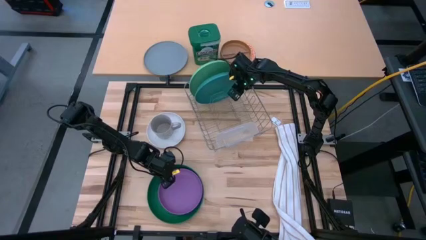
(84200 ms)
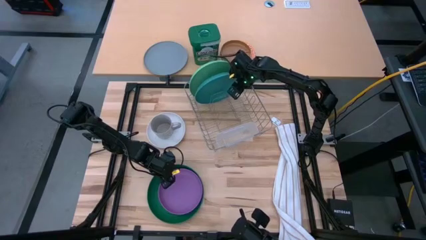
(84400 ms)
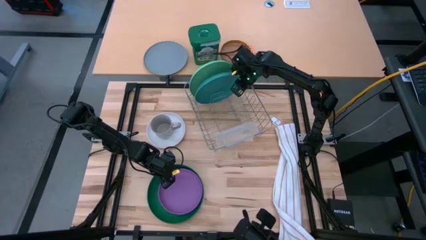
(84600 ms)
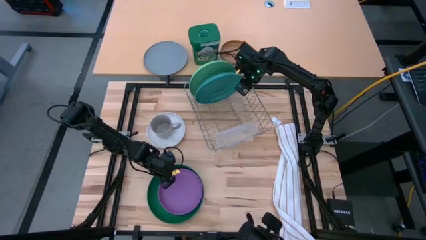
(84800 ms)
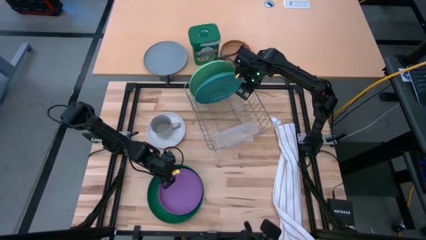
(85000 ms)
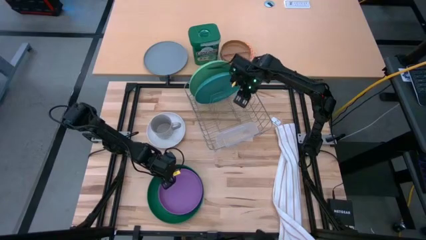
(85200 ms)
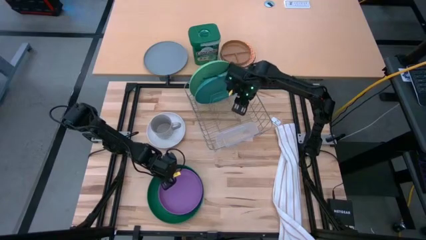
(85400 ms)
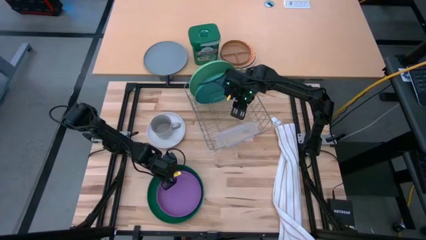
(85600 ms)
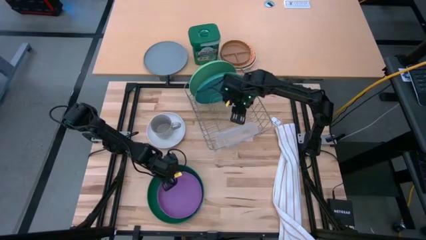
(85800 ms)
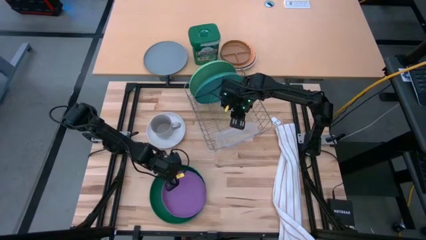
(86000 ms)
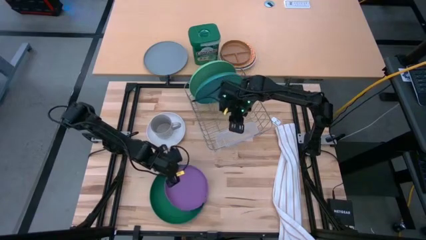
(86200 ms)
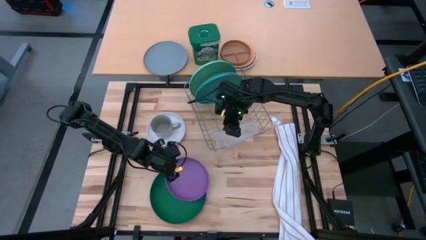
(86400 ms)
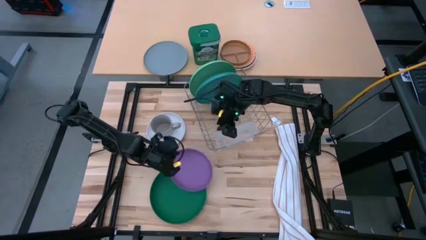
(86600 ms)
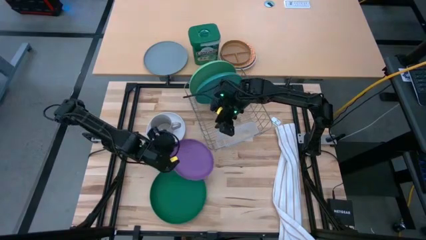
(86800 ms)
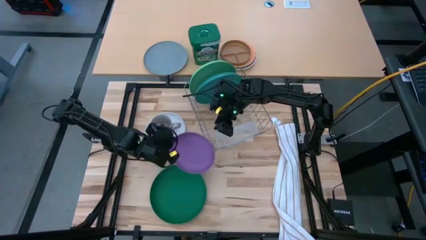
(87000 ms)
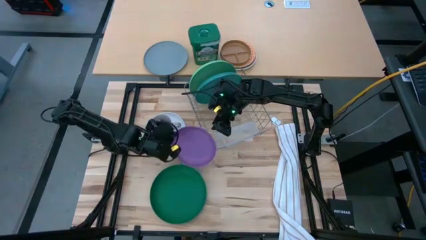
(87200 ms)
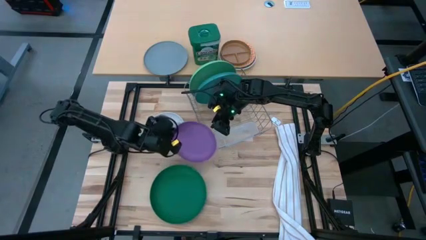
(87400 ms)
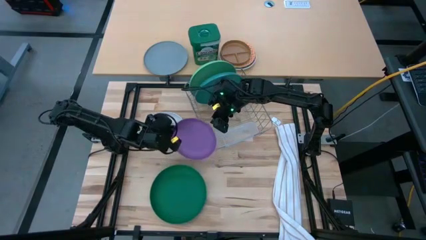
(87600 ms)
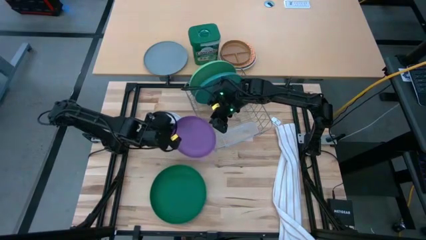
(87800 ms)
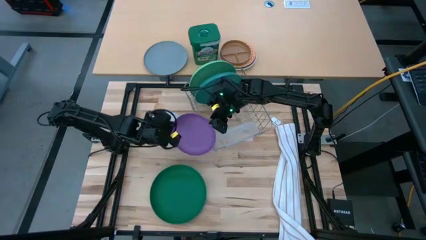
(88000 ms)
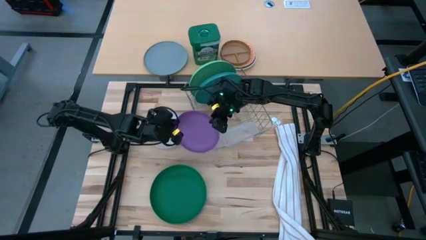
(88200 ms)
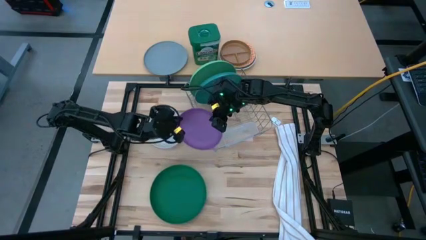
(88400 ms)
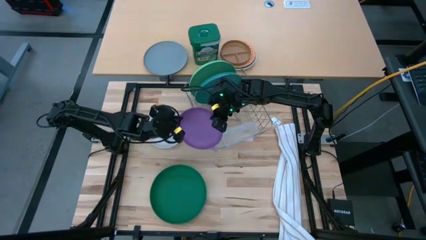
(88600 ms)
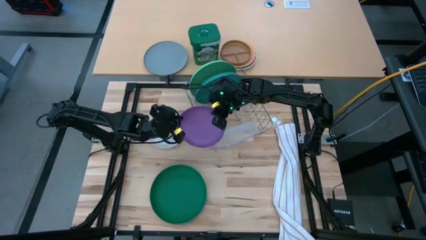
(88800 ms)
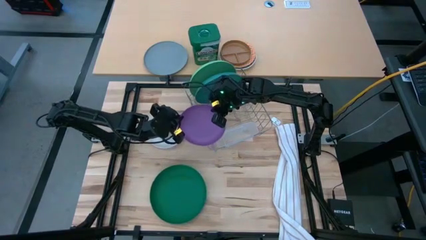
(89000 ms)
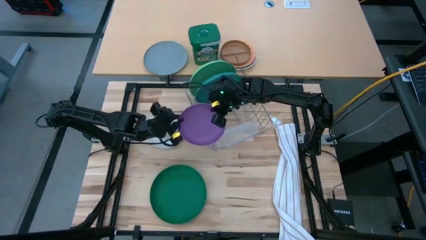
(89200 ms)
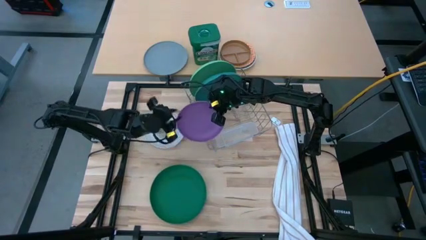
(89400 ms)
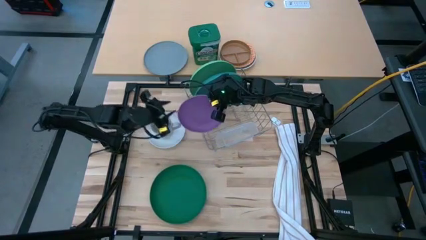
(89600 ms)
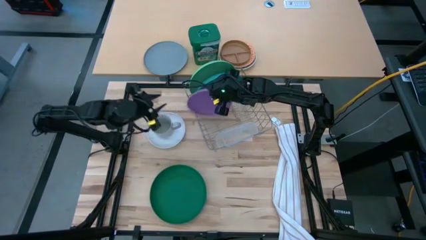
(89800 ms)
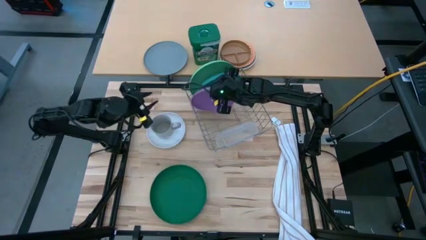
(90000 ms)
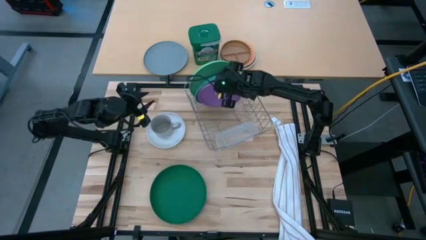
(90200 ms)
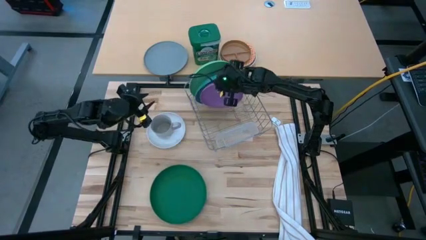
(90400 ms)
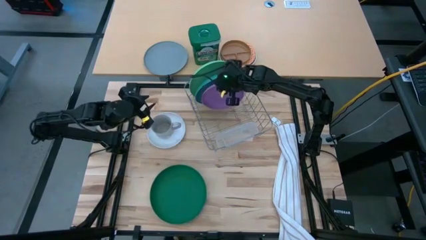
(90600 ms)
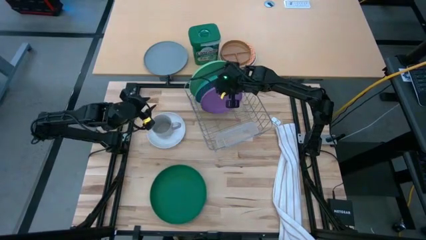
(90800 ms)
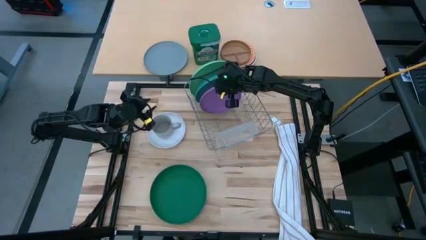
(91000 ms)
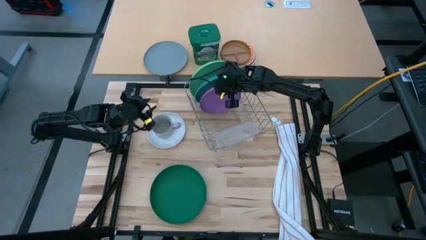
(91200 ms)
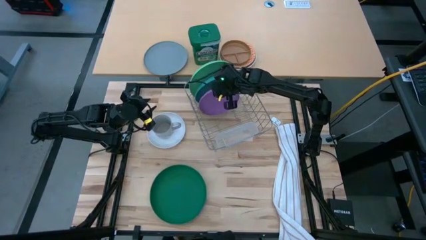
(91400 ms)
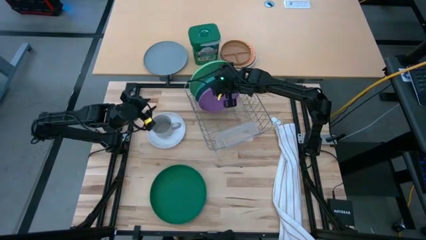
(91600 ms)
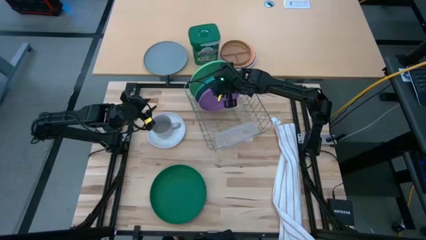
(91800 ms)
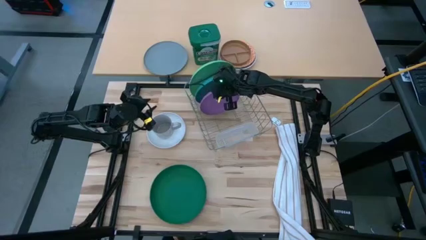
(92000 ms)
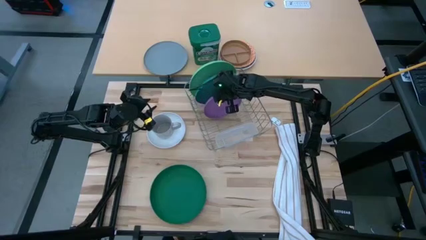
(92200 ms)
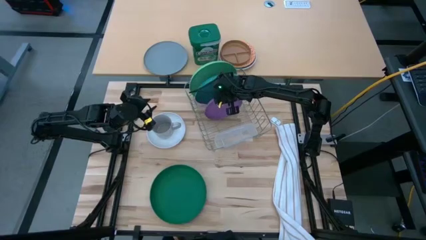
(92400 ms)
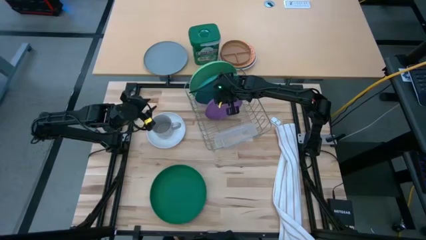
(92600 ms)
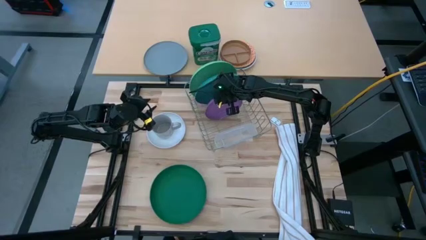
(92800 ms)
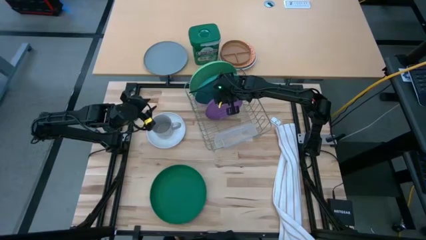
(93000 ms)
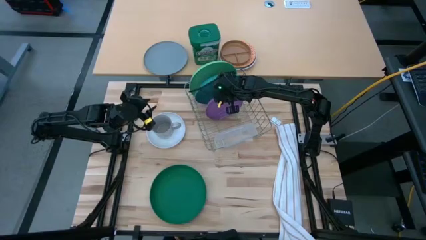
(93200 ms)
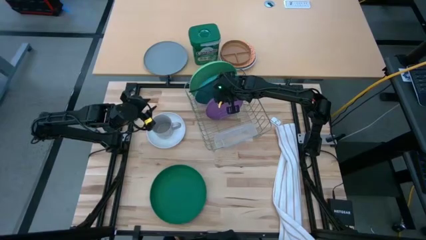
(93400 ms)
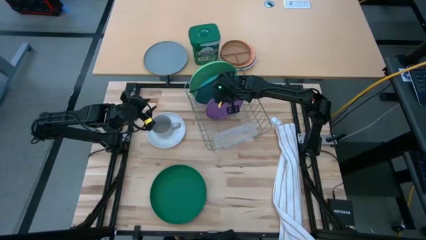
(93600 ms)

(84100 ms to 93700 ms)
Task: Sort dishes
Put the purple plate into the dish rack

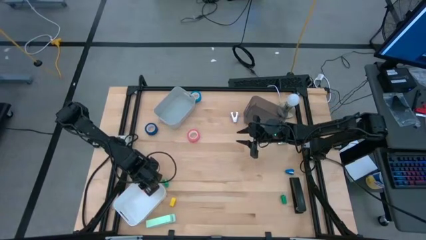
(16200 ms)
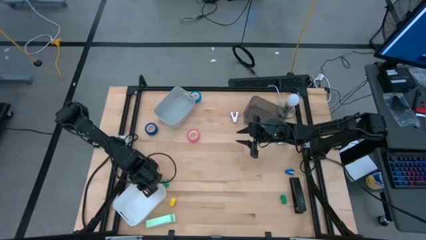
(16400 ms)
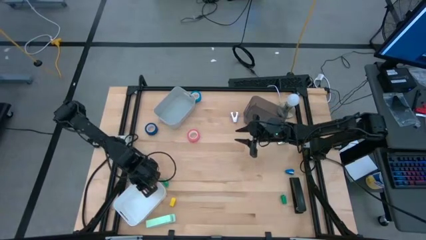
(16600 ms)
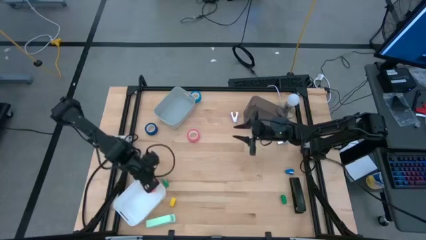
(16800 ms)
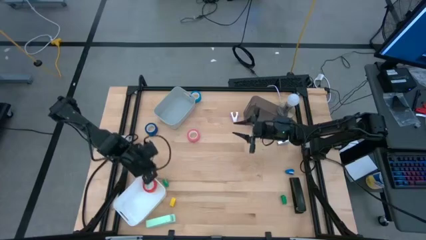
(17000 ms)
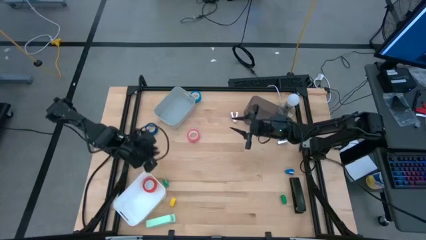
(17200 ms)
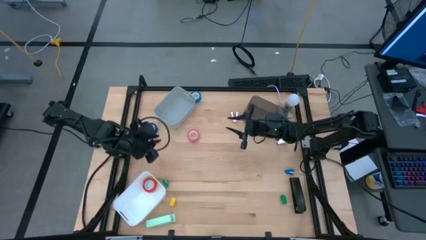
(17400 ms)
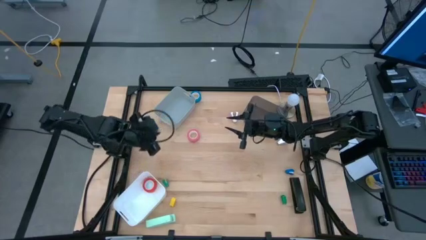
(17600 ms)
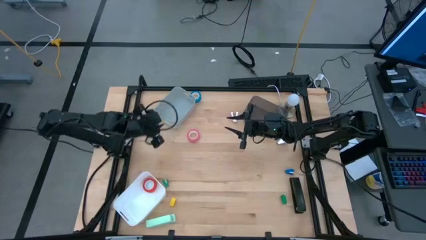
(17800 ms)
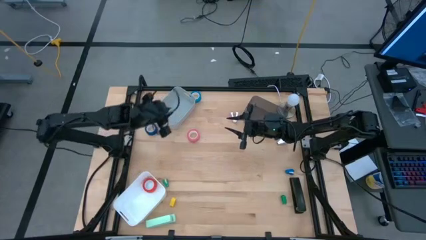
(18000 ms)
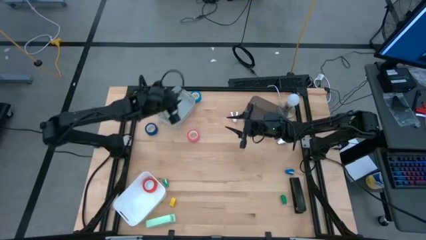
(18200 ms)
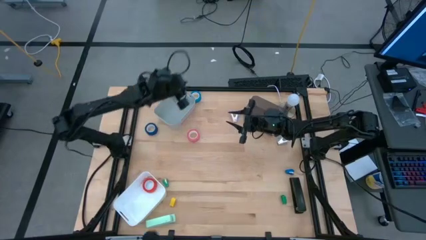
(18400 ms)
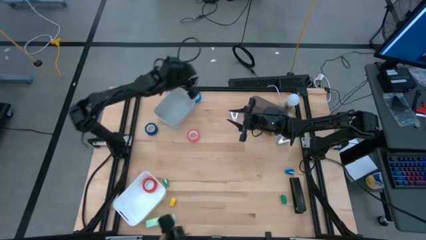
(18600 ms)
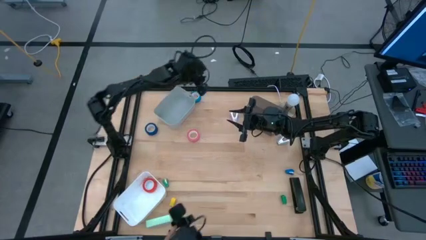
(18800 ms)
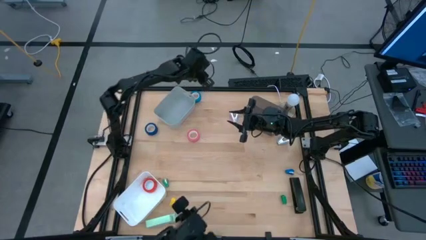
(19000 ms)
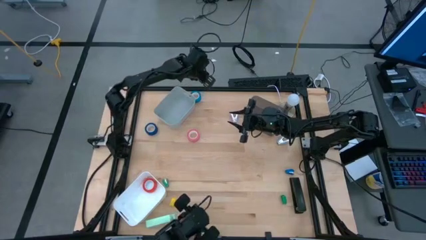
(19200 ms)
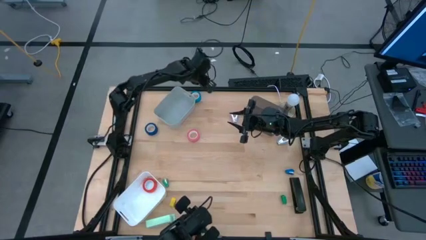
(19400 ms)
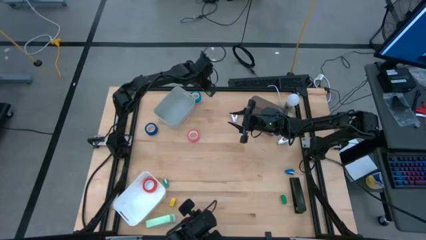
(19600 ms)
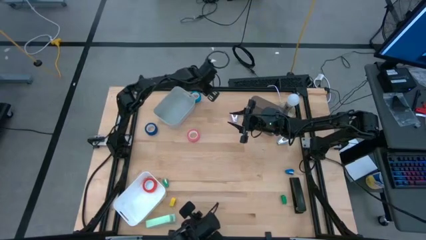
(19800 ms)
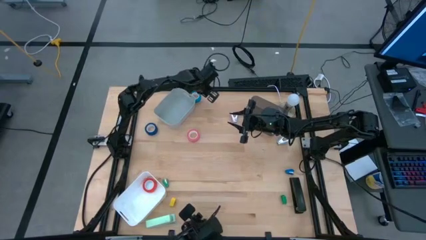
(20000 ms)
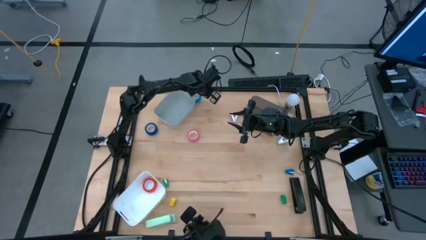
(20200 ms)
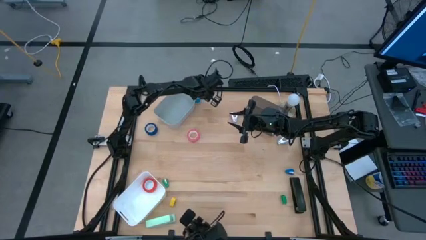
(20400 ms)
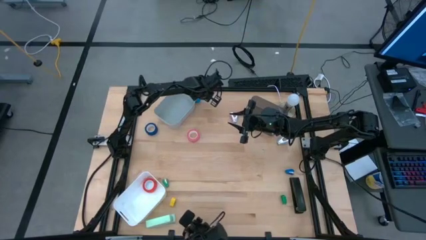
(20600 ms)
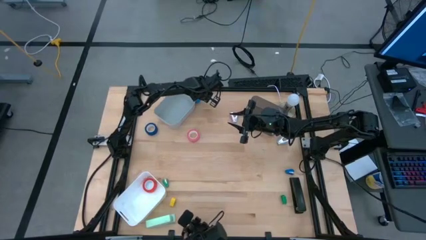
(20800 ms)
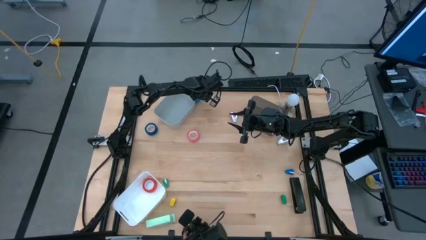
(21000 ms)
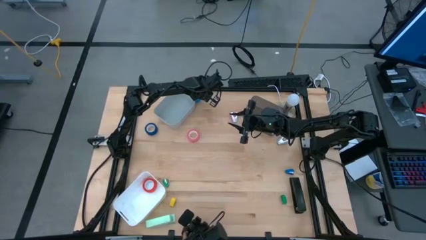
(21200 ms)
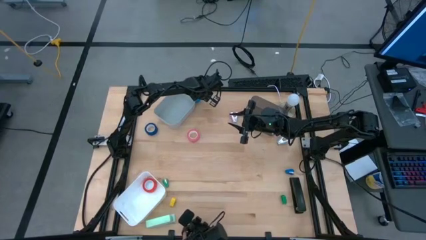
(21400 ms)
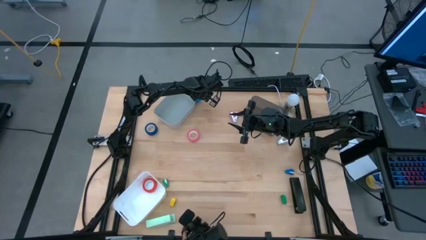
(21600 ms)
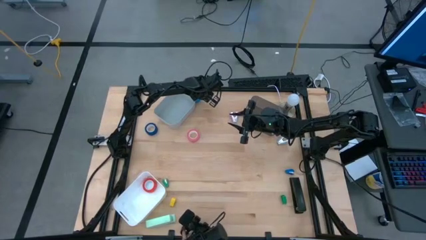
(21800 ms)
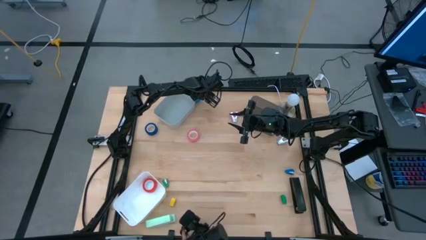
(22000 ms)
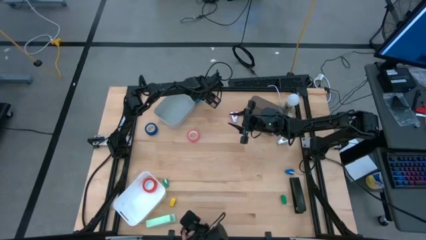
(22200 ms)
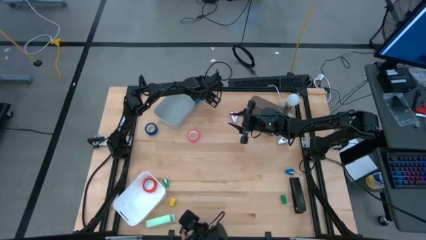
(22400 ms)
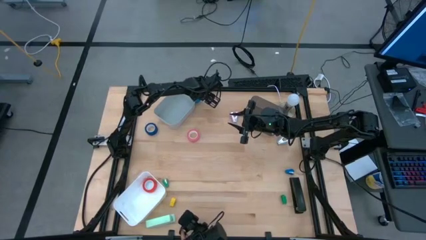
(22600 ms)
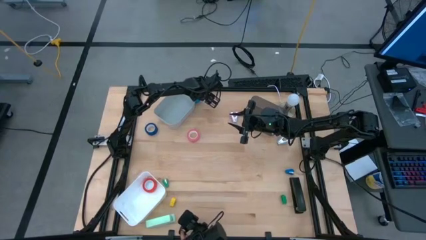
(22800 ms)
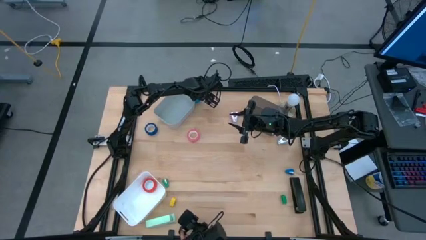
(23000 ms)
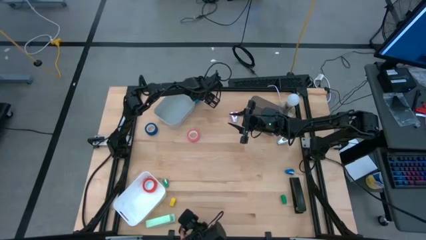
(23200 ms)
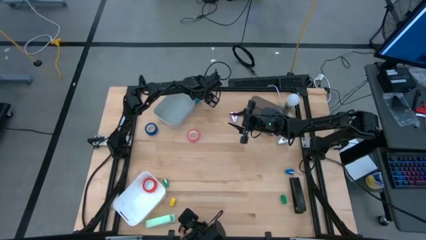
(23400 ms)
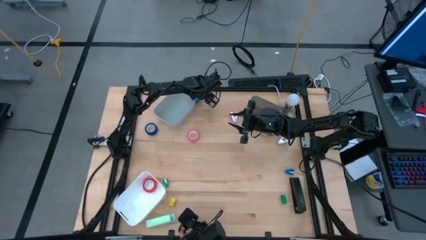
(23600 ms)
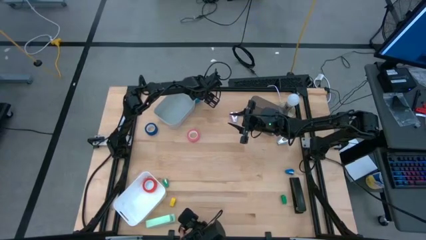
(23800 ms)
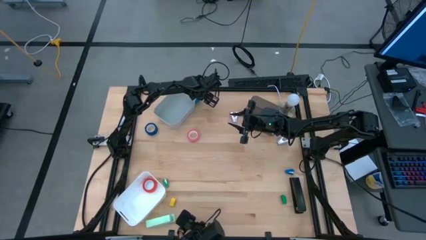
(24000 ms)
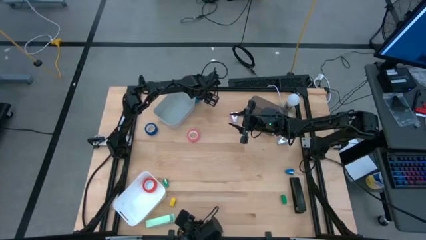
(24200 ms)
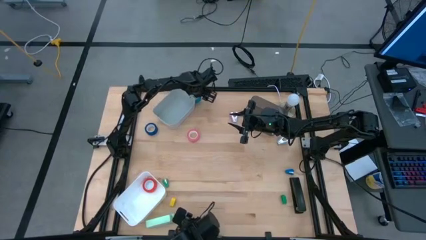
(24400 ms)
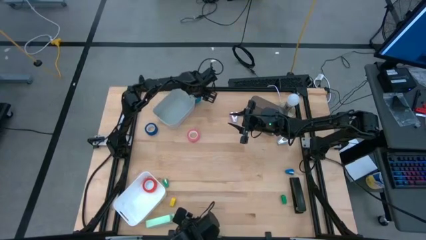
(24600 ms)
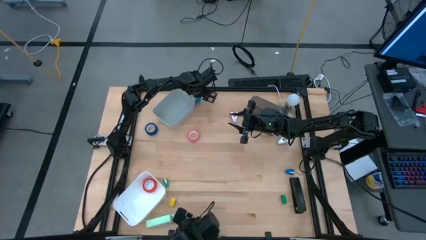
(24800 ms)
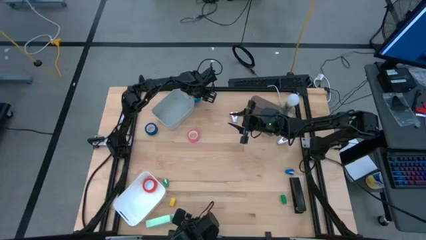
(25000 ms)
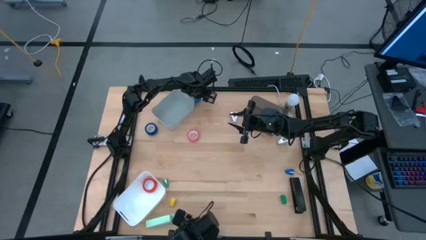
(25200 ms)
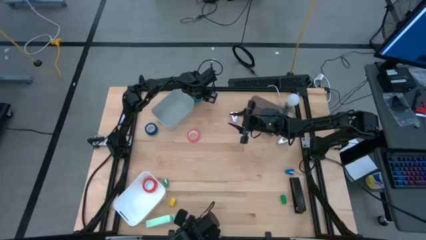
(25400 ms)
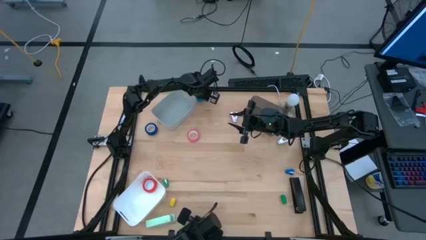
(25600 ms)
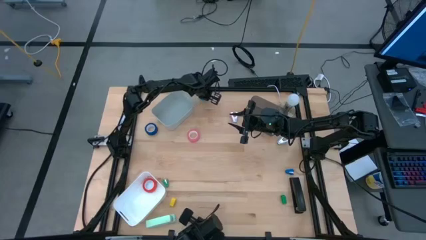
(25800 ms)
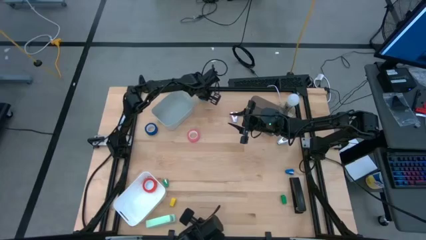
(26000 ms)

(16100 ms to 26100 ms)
Task: Pick and place Stapler, Stapler remover, tape
Put the light blue tape into the white bin
